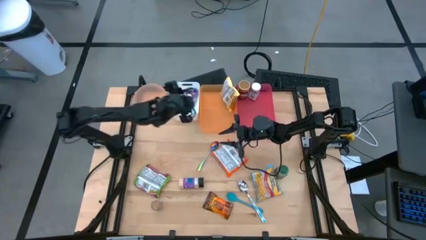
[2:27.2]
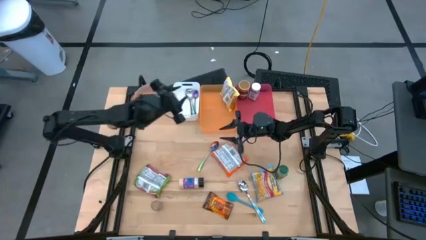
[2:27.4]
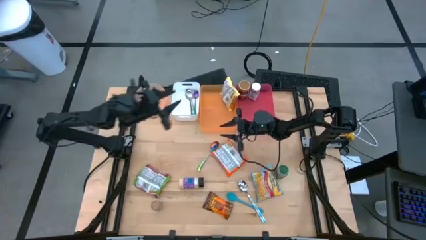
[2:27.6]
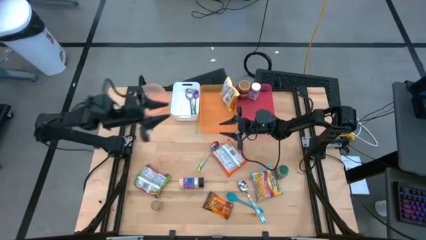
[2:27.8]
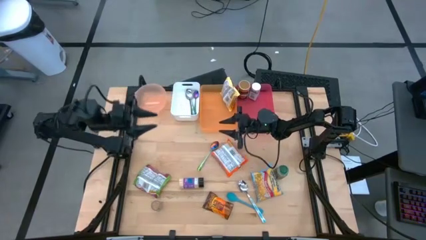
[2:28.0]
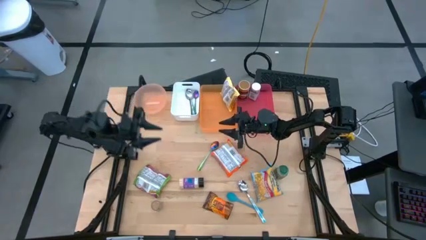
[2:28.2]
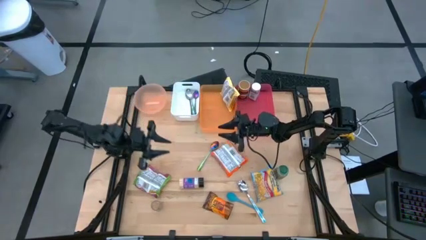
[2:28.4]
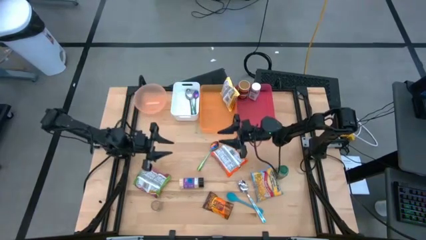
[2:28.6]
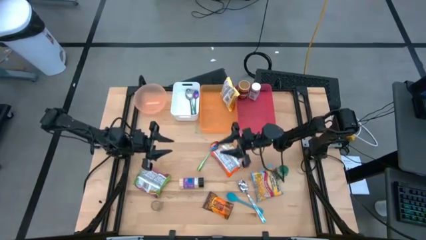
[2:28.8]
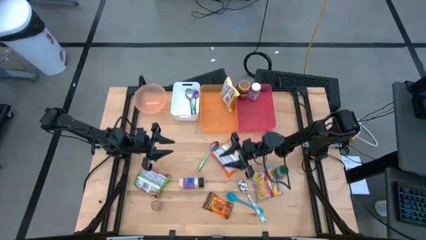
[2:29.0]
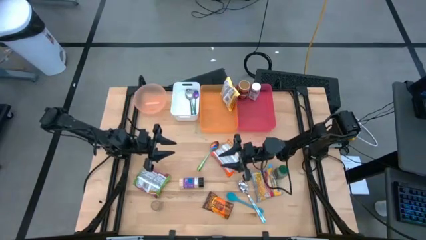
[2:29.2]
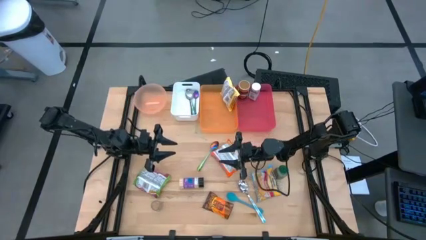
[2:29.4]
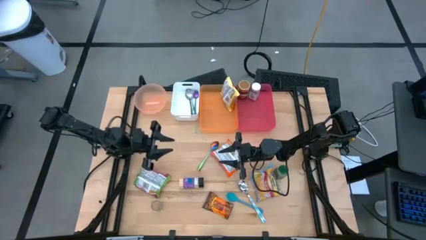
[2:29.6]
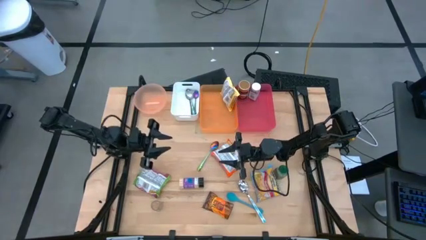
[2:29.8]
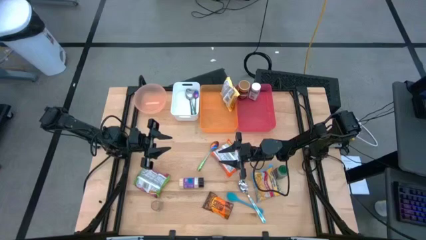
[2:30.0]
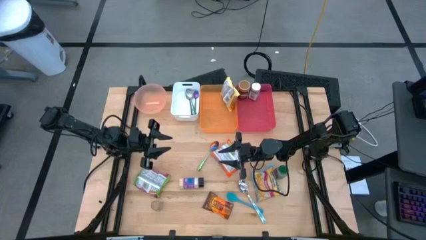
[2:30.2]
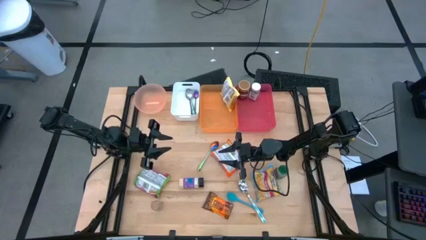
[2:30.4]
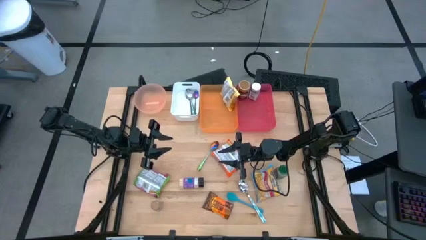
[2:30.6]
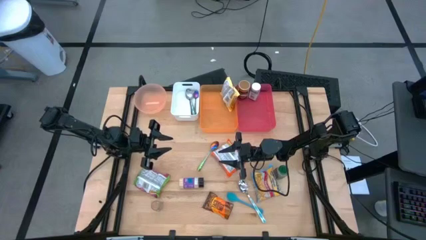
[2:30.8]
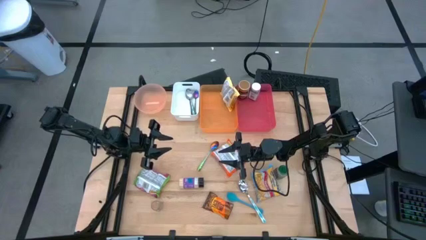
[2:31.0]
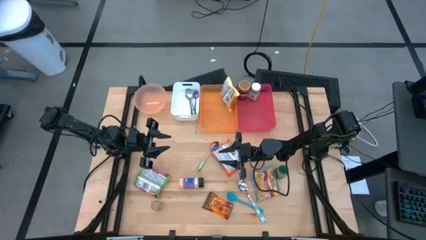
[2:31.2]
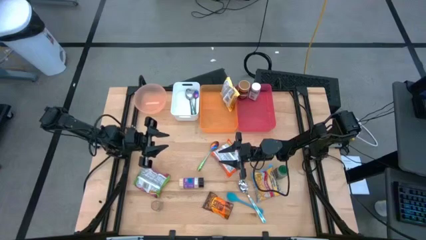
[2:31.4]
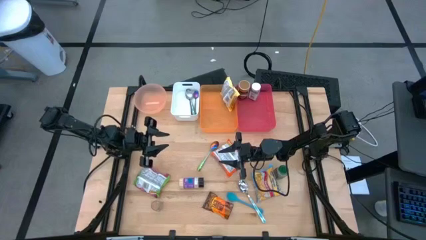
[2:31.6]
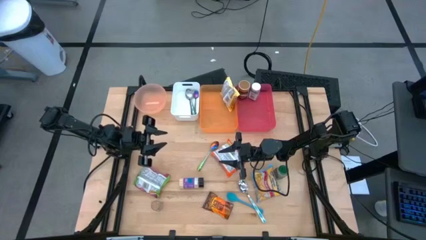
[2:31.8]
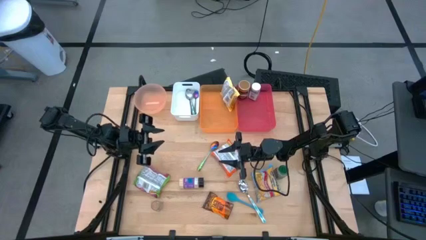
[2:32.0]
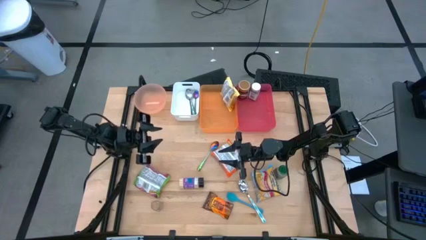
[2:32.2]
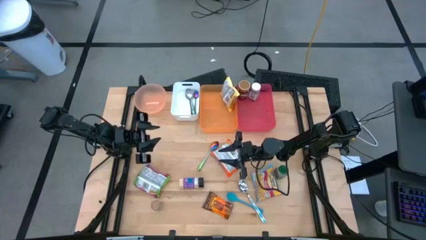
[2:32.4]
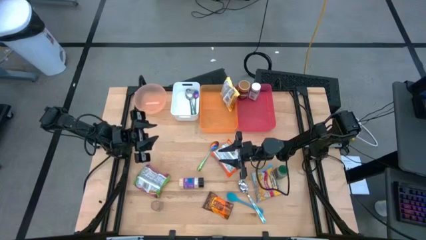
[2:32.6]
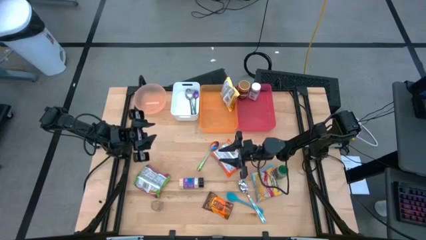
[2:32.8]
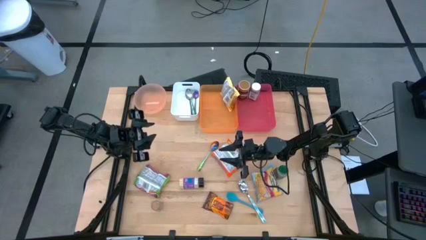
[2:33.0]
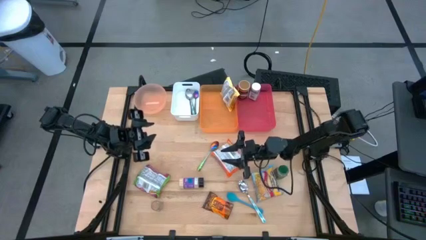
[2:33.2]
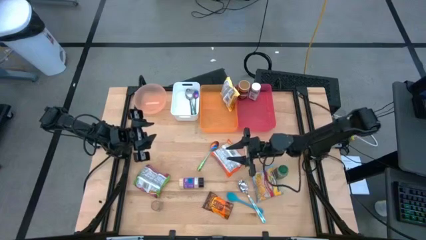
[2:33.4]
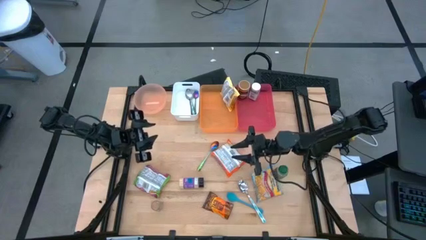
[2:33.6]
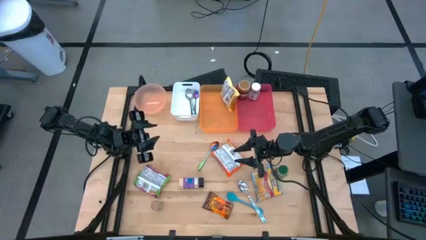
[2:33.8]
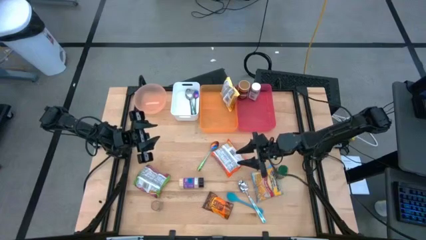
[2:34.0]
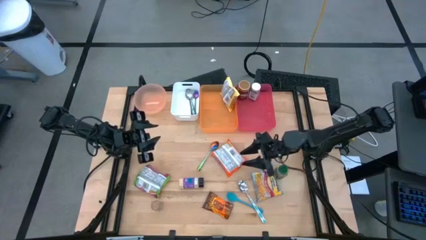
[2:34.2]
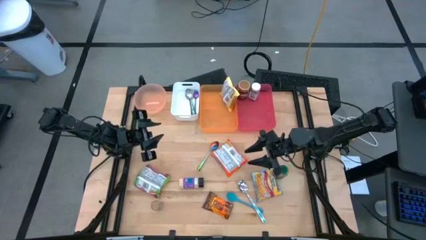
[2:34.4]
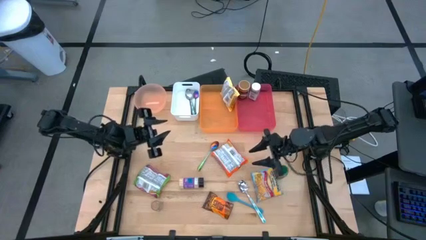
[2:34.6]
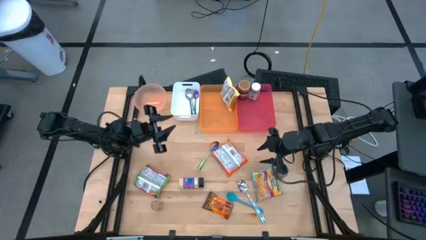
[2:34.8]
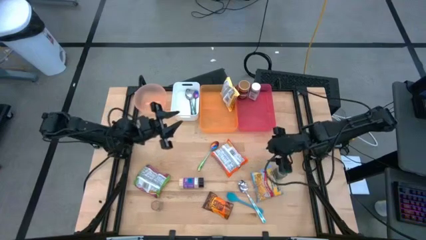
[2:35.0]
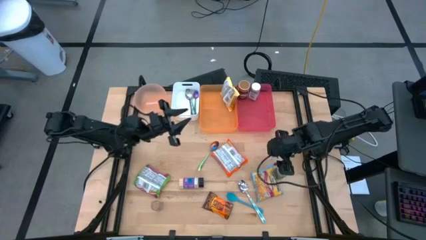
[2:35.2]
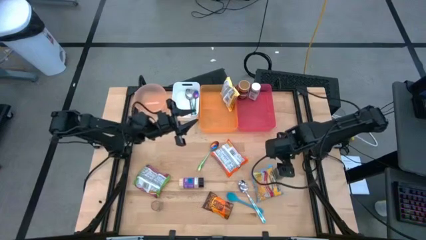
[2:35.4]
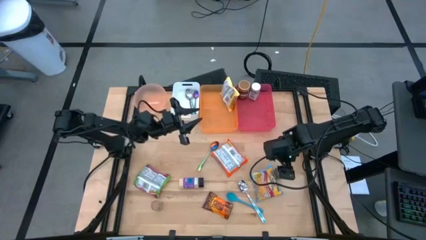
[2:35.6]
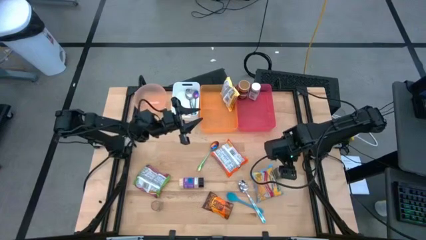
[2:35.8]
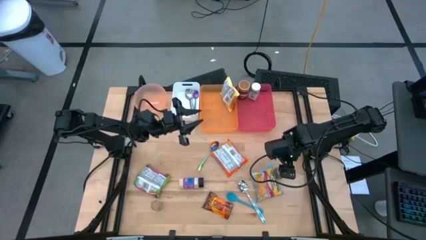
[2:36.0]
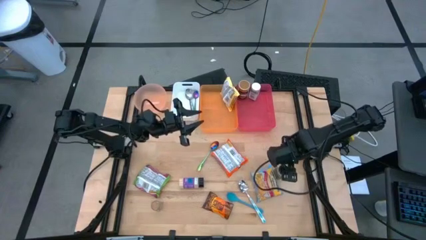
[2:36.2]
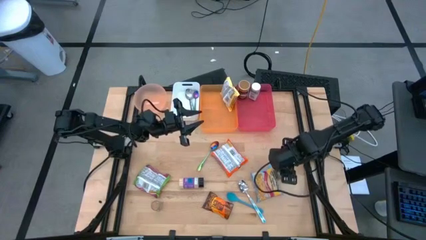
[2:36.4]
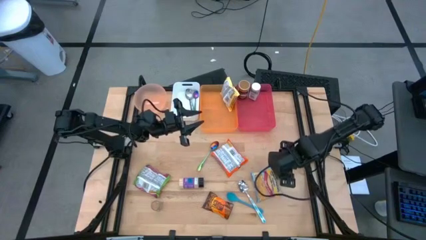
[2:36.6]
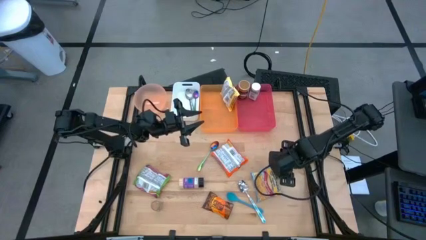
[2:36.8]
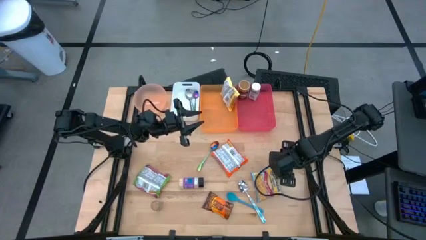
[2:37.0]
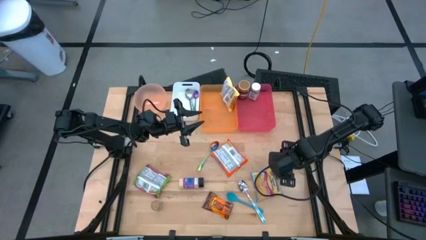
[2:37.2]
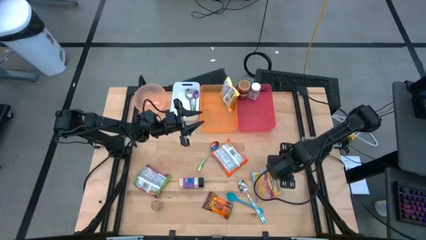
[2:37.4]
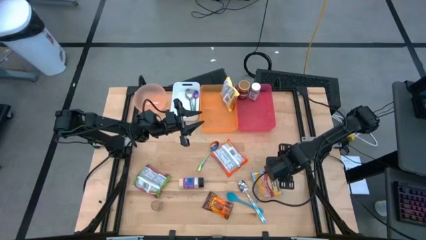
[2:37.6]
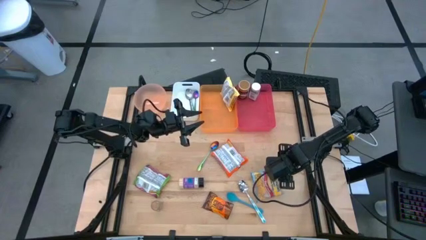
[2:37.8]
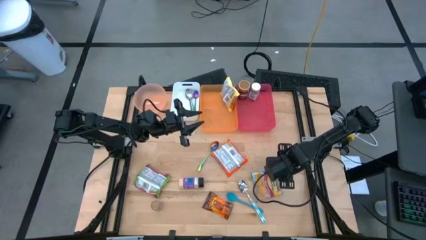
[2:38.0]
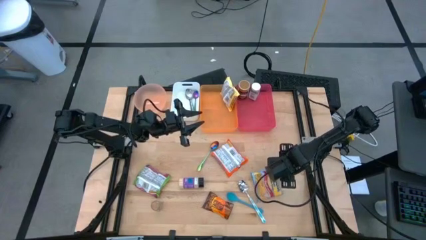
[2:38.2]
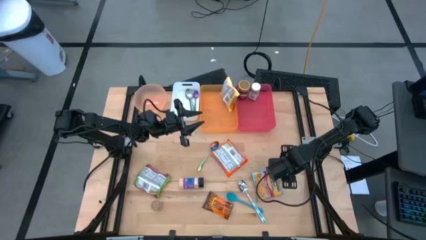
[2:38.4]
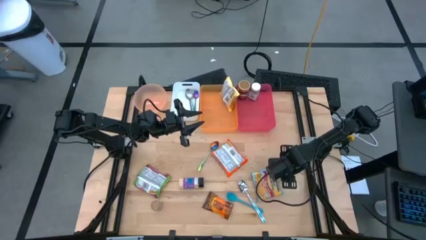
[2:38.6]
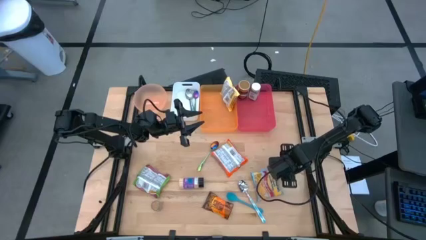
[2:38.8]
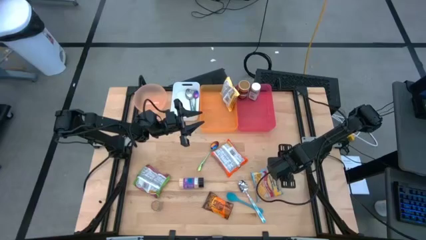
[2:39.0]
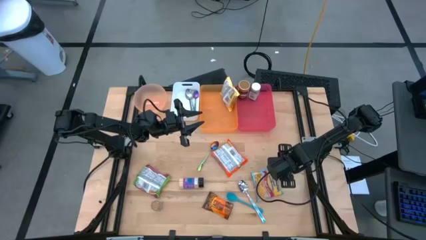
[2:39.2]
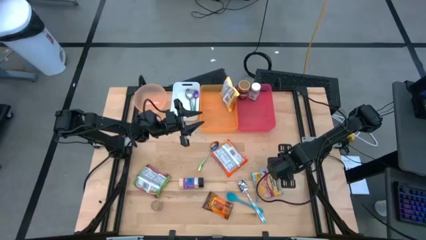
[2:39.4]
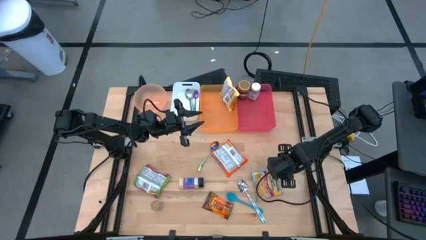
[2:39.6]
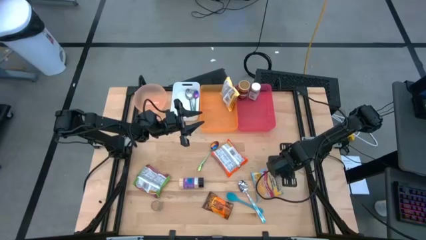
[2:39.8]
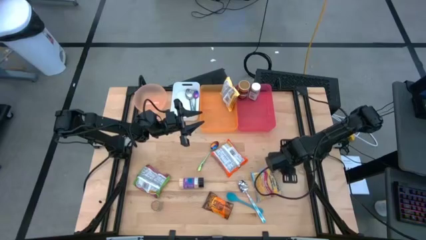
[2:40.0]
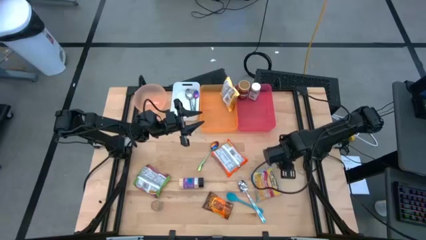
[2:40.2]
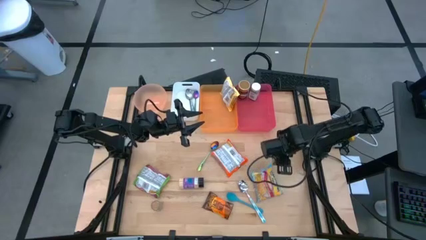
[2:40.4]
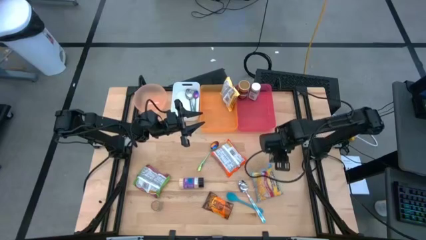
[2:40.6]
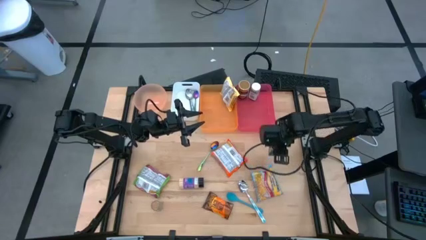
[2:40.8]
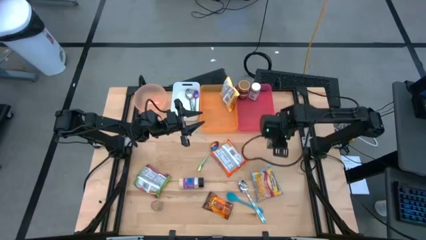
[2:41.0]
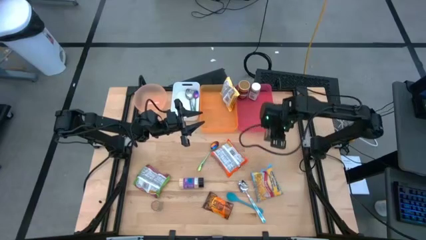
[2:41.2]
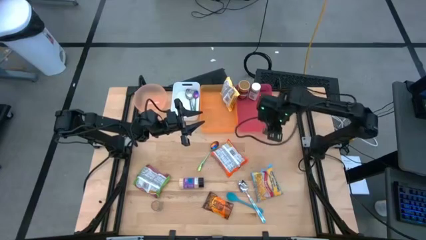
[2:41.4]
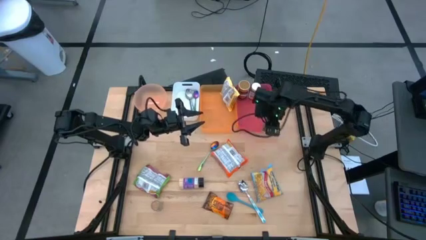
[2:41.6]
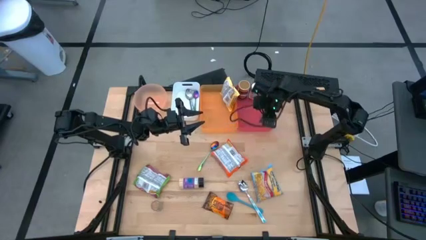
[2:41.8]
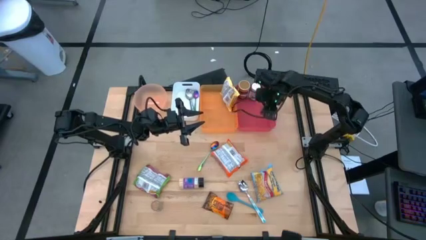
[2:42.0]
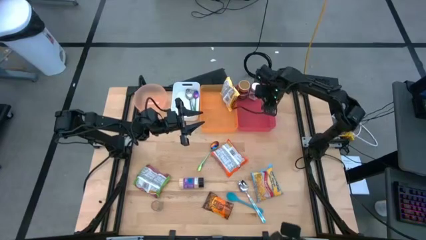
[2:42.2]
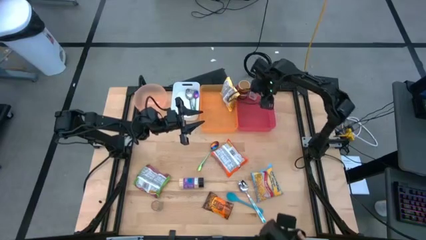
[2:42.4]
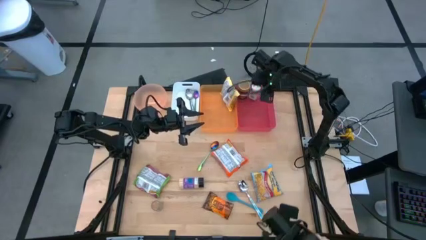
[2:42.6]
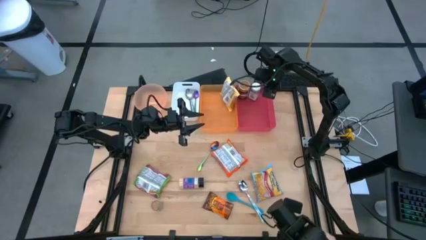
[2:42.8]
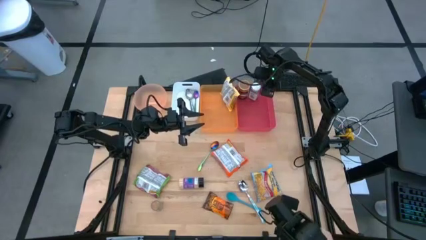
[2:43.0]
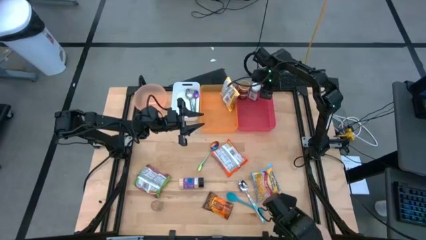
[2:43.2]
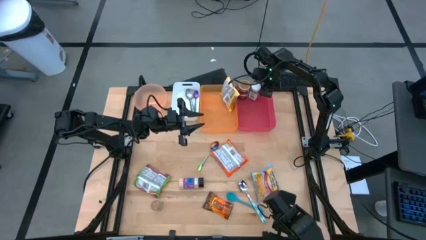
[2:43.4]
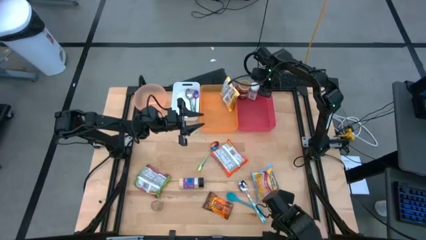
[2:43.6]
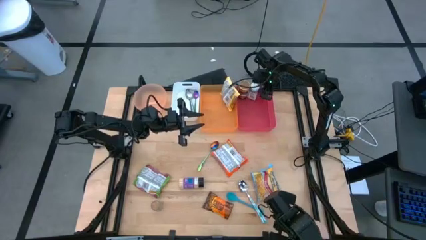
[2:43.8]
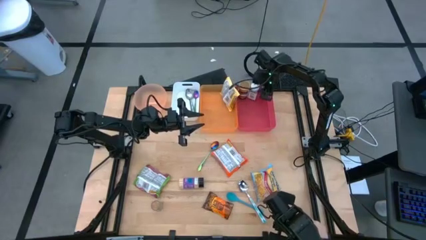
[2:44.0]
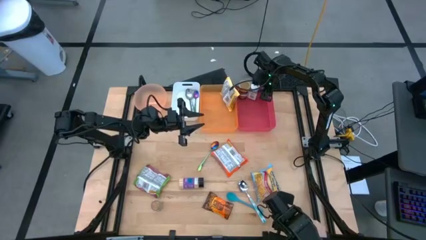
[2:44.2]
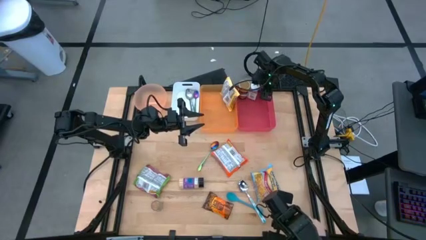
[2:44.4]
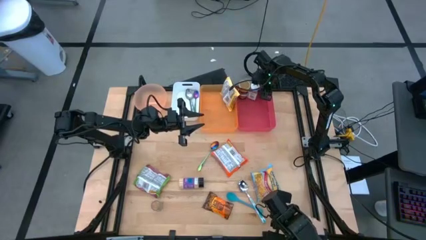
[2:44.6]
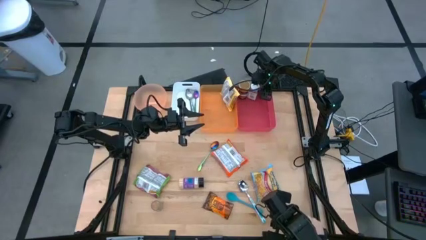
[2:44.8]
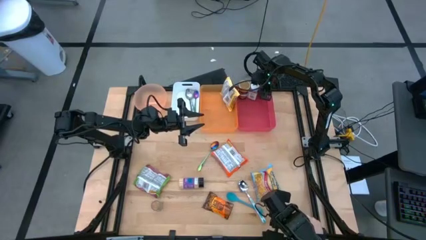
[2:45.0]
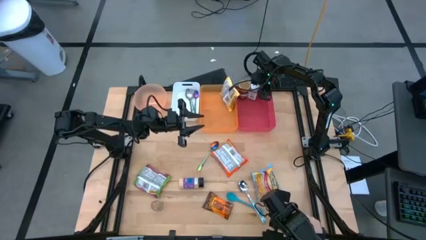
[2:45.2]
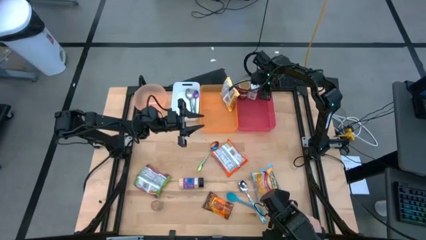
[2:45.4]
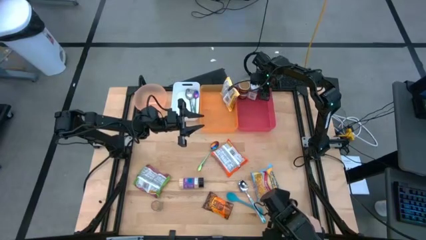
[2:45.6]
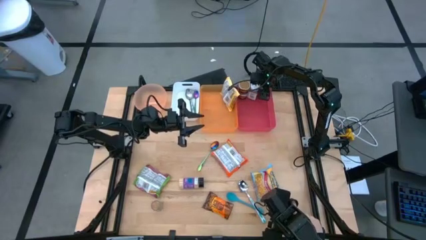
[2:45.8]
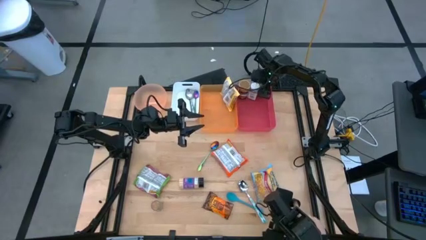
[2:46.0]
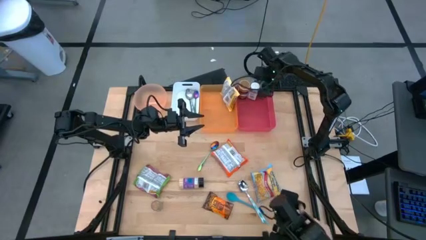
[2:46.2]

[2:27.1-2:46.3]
Task: Pick & Place Food Item
Put the green seasoning bottle into the red bin
